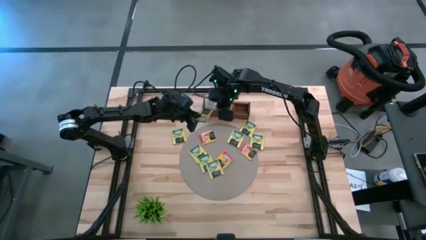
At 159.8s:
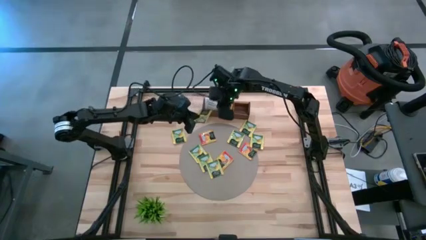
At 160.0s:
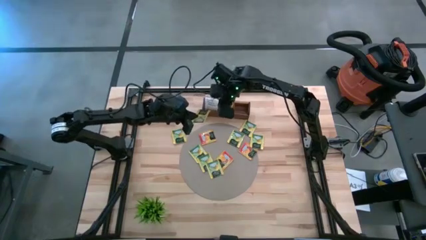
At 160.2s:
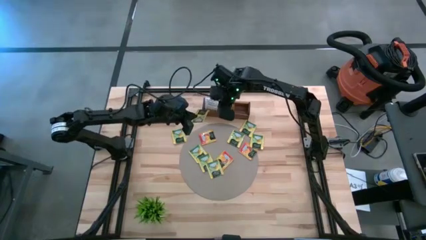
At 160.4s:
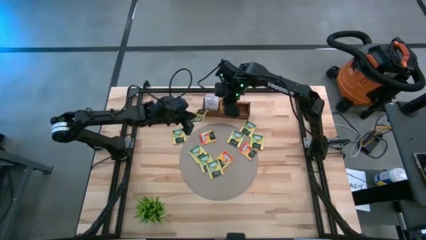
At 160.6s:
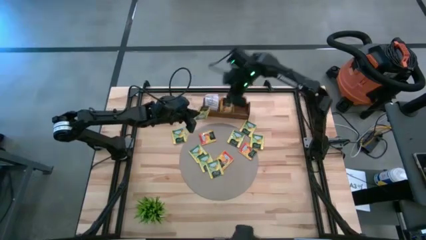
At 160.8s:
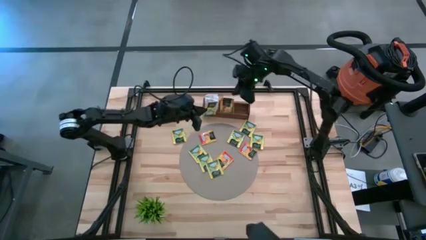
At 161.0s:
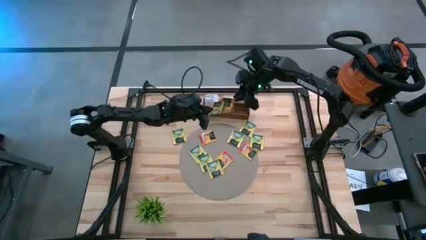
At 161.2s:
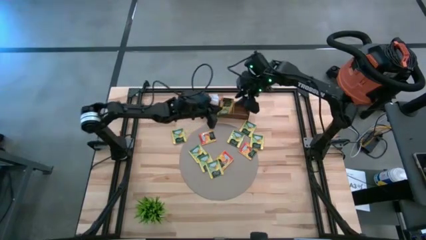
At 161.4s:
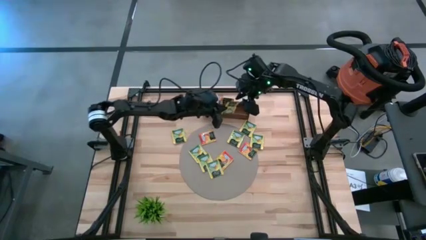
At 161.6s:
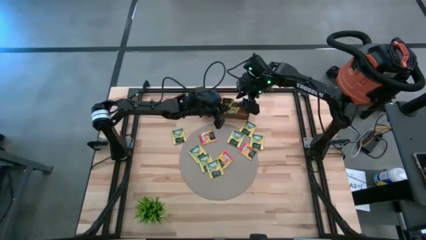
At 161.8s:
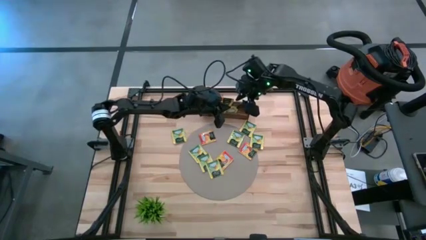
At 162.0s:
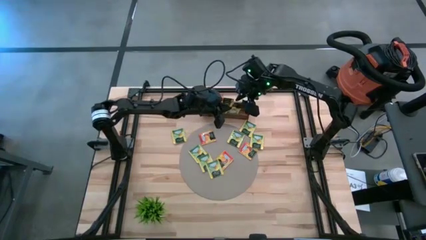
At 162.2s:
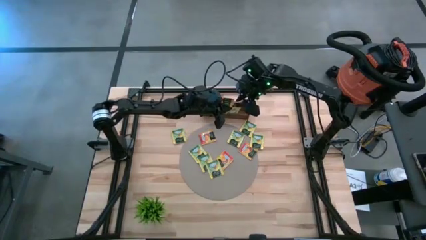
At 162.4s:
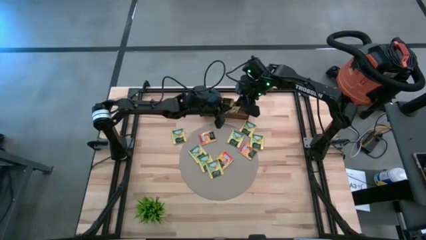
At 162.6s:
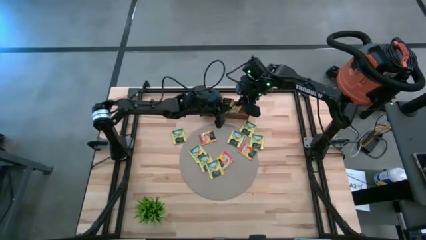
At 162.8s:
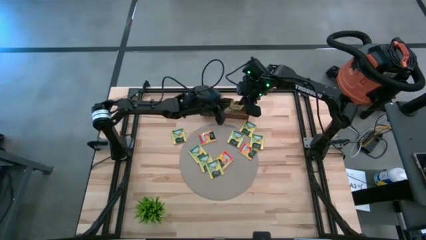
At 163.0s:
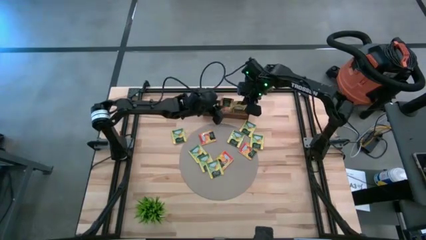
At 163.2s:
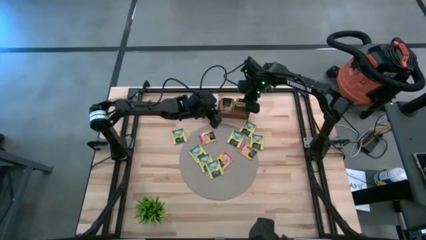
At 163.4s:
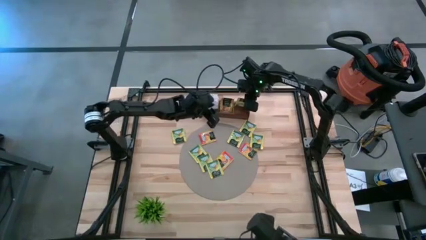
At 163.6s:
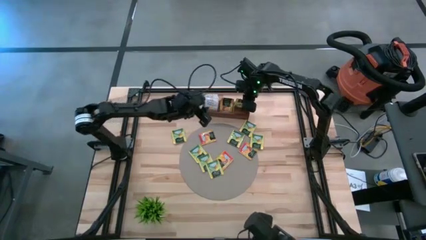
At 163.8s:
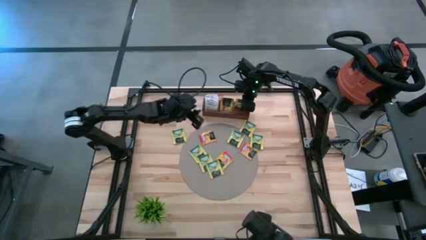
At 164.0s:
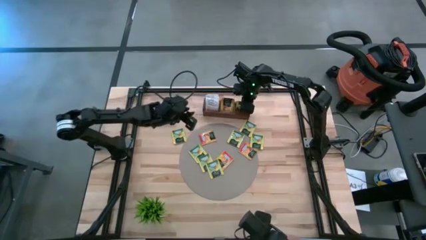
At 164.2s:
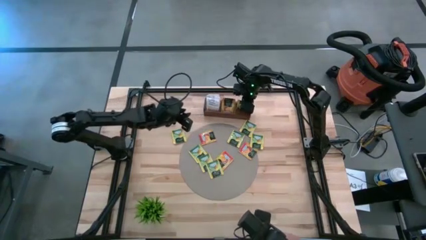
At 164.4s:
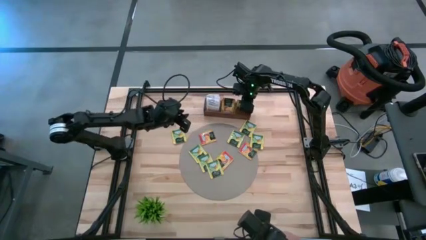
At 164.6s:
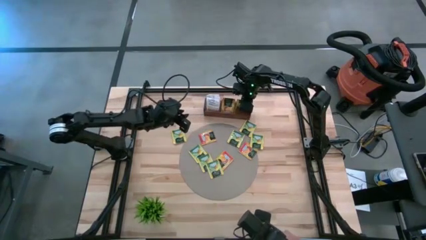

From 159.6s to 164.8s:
Task: Pick & Place Tea
Put the yellow tea bag into the right section of the wooden organizer

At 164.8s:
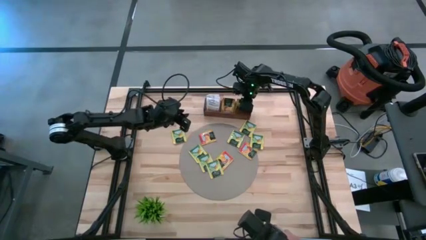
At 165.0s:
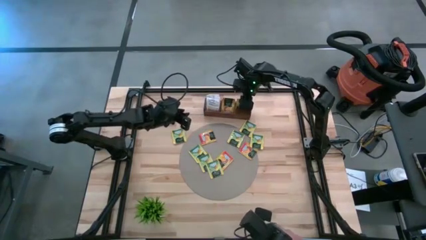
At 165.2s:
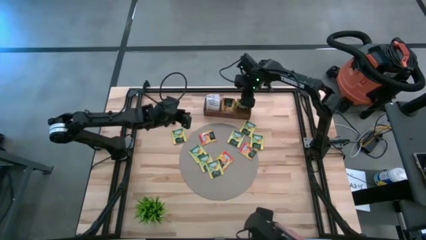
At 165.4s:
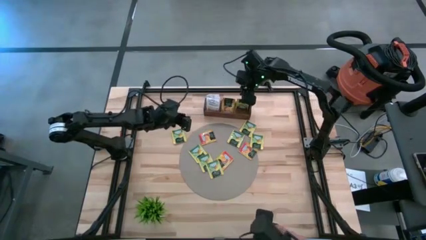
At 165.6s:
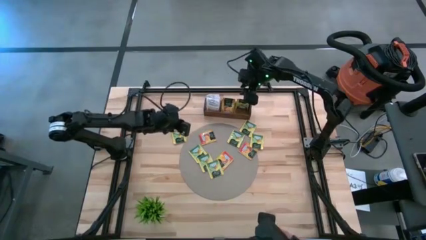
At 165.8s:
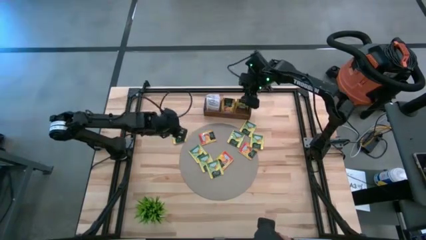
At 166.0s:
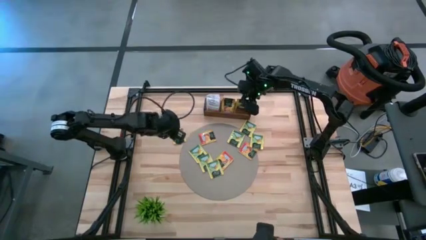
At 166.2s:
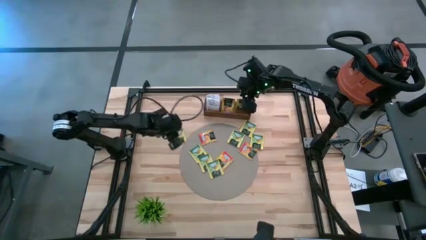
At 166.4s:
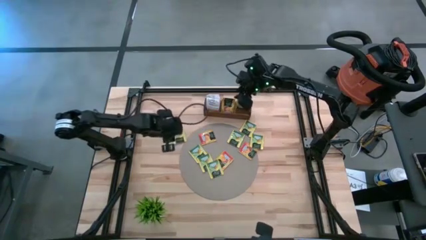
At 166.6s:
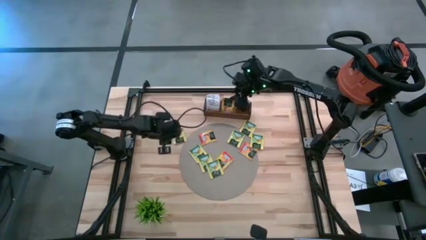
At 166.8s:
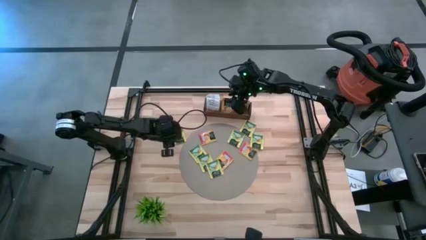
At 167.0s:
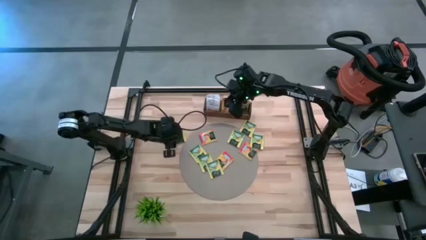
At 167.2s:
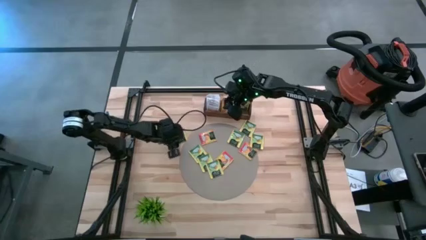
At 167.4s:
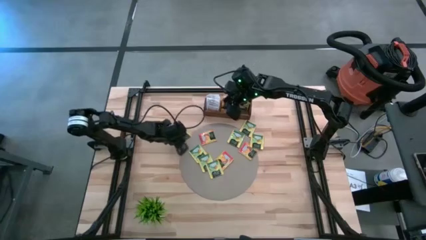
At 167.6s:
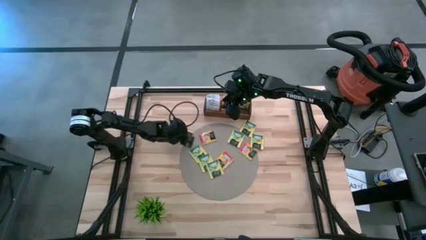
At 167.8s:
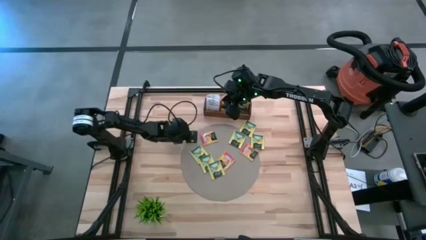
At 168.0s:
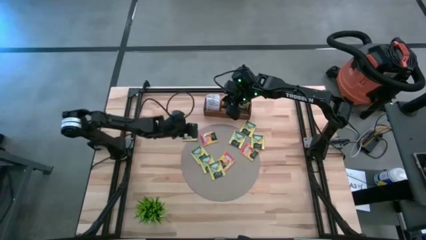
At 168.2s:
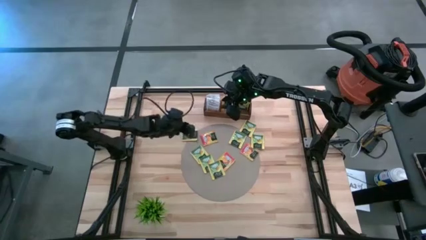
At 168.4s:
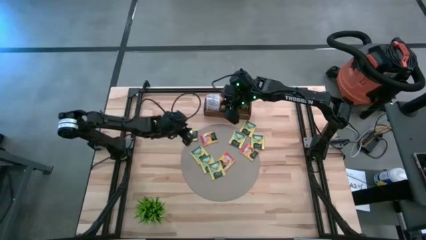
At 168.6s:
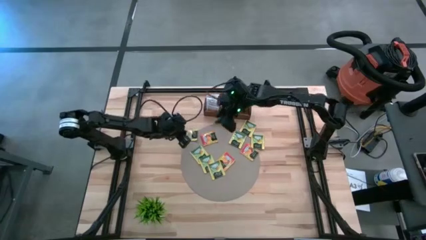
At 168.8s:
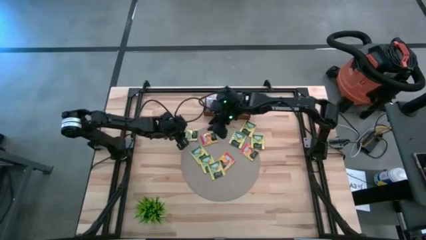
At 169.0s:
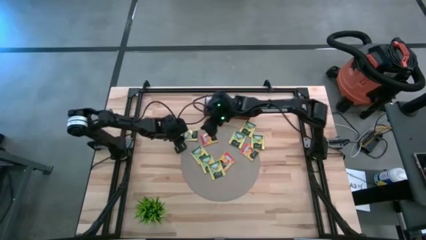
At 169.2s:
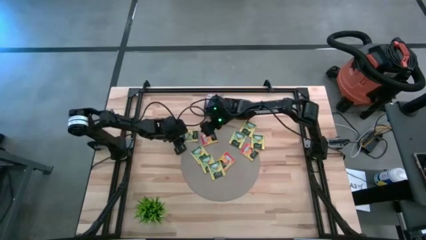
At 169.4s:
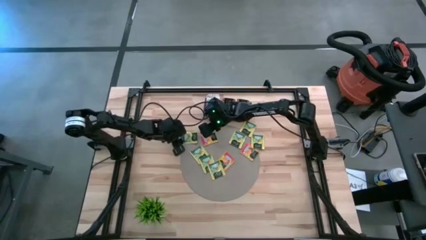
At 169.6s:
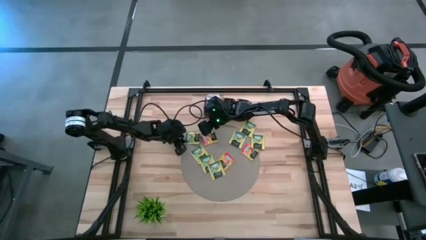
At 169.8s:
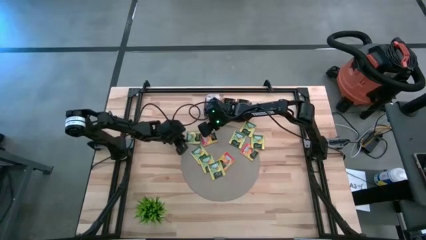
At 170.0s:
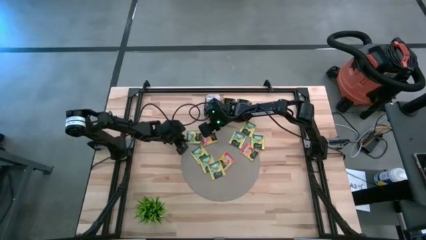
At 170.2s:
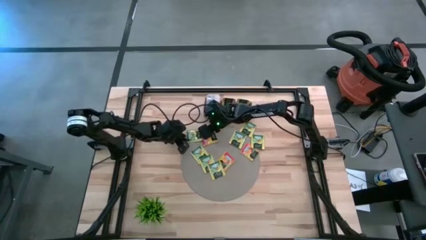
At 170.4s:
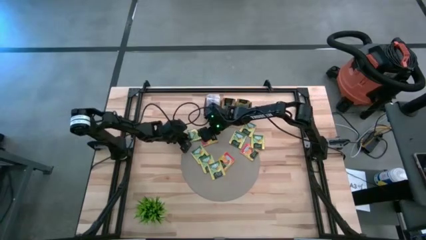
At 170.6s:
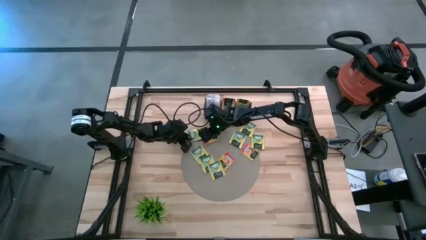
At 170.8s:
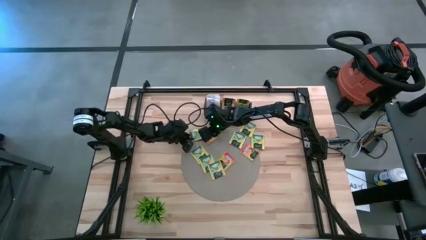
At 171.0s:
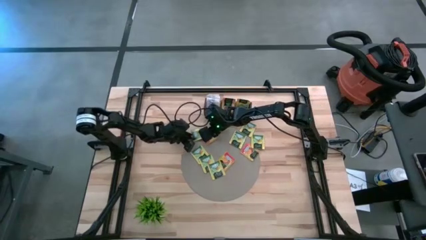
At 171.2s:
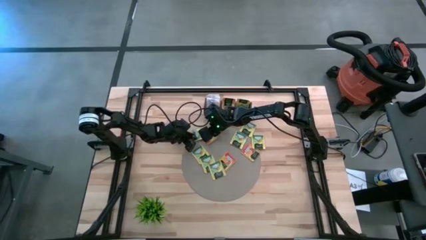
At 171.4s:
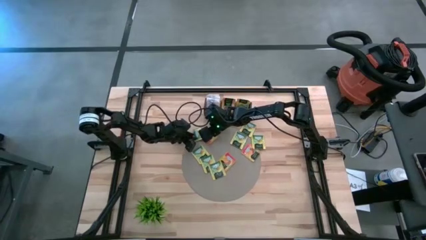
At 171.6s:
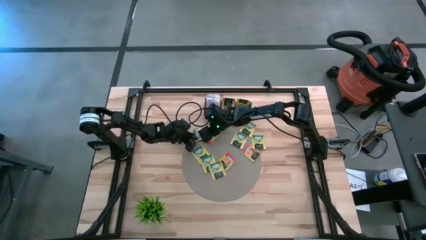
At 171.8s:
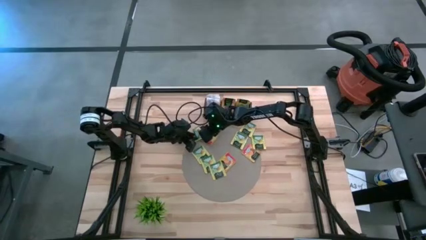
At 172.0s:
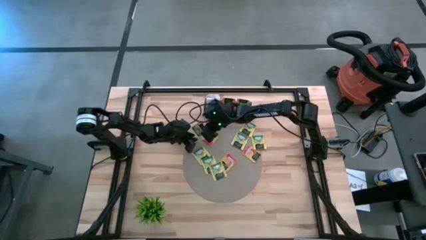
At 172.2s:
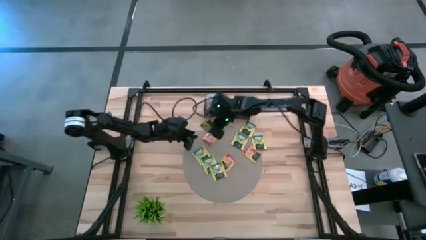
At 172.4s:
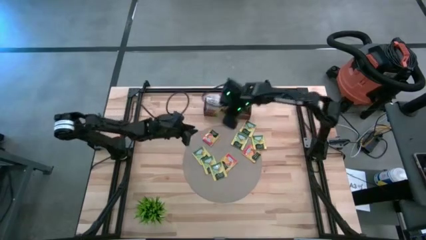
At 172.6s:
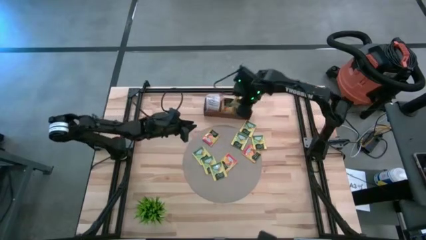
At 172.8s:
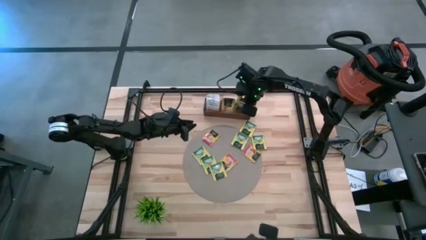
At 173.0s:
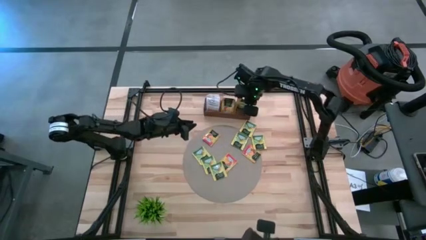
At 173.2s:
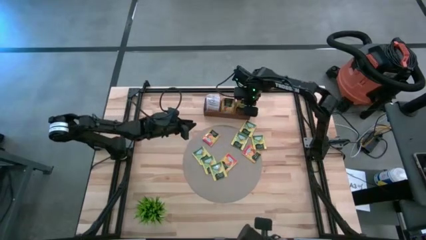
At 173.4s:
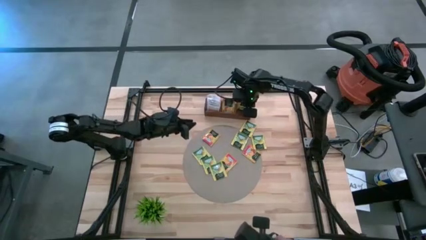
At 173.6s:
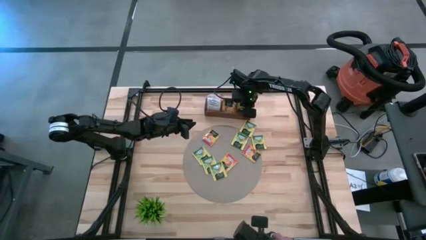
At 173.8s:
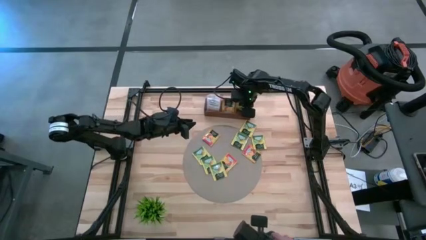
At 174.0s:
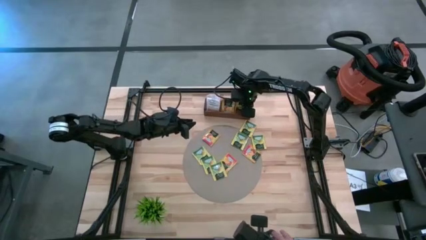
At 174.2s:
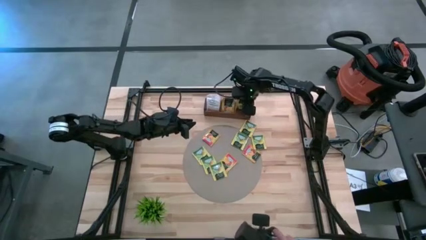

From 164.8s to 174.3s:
Put the yellow tea bag into the right section of the wooden organizer
